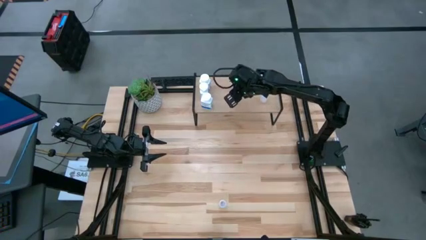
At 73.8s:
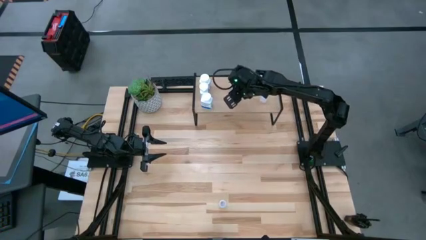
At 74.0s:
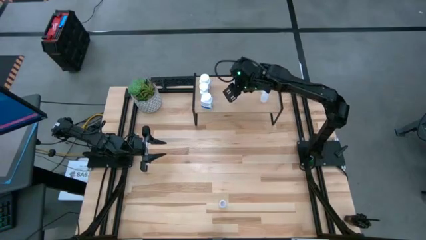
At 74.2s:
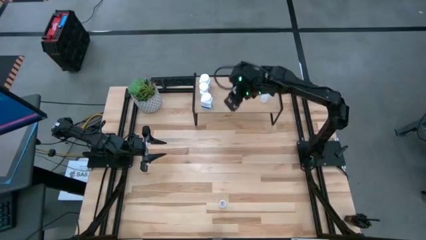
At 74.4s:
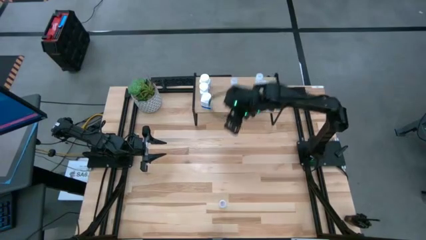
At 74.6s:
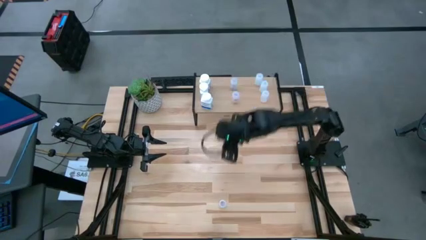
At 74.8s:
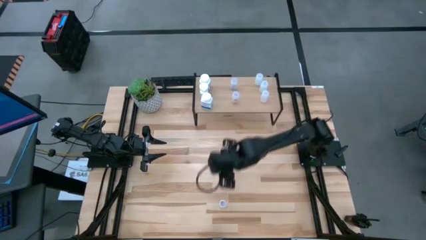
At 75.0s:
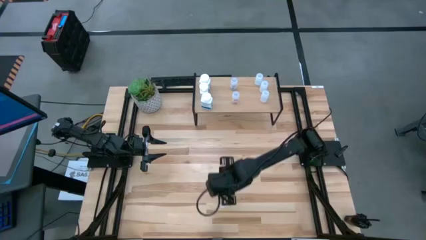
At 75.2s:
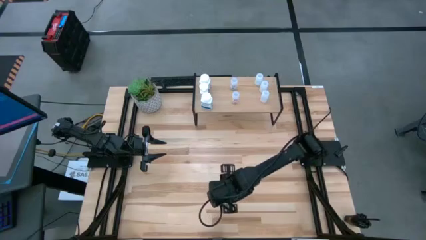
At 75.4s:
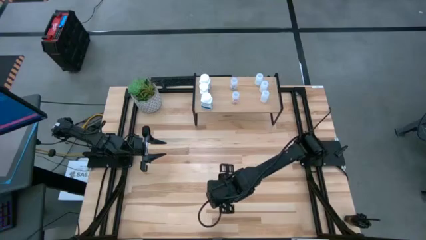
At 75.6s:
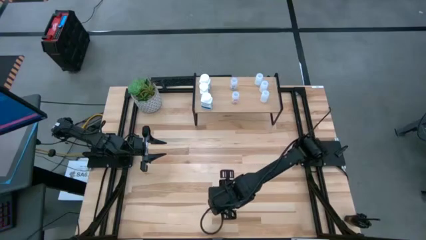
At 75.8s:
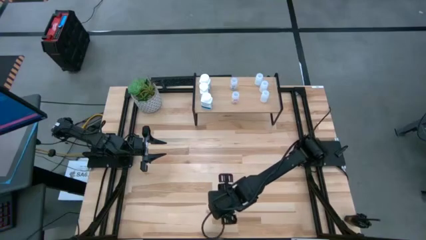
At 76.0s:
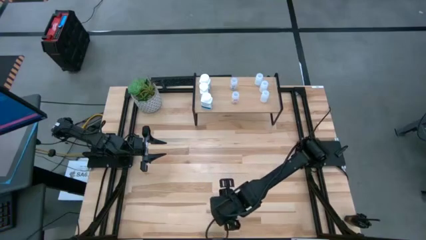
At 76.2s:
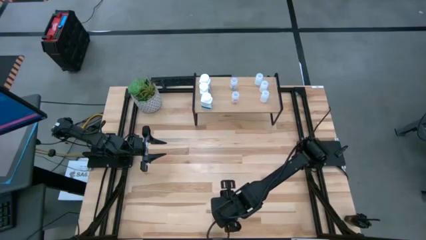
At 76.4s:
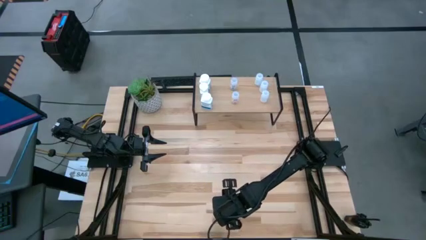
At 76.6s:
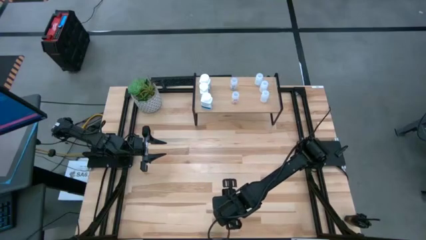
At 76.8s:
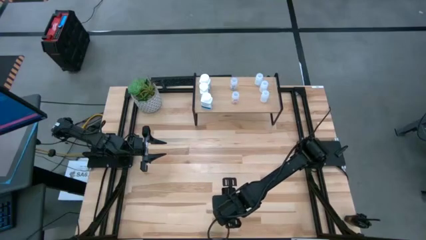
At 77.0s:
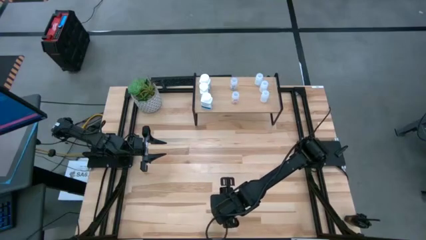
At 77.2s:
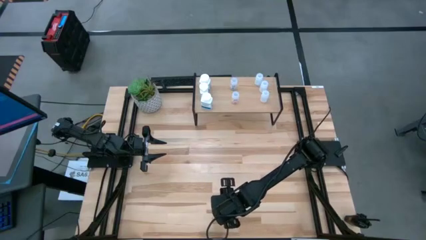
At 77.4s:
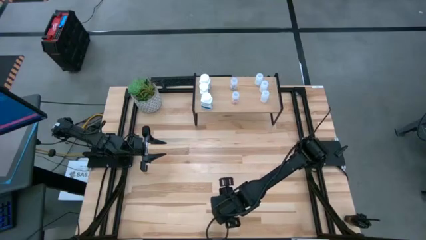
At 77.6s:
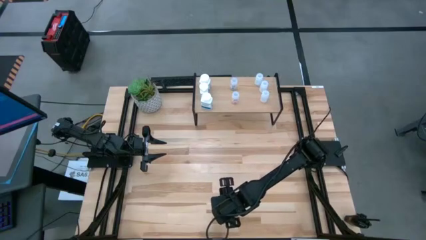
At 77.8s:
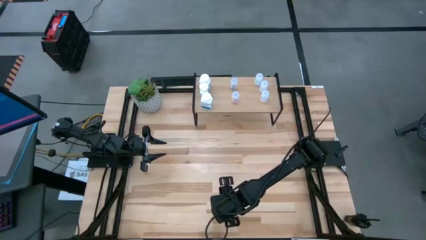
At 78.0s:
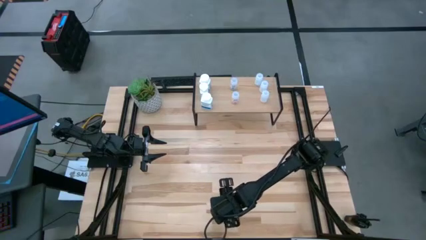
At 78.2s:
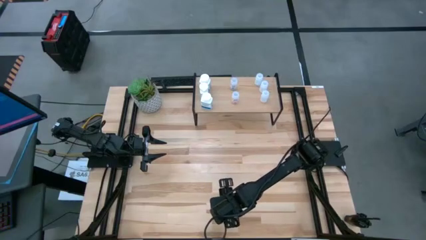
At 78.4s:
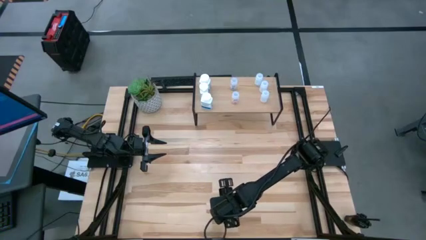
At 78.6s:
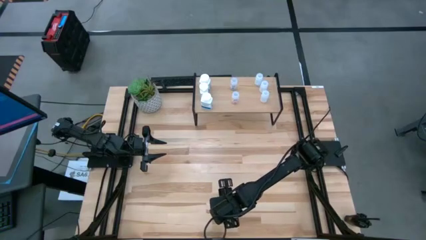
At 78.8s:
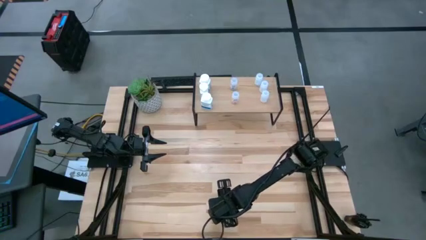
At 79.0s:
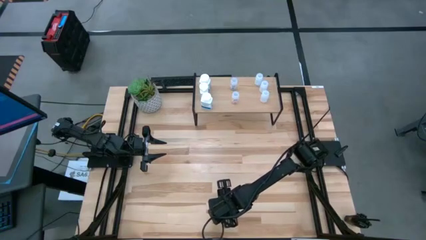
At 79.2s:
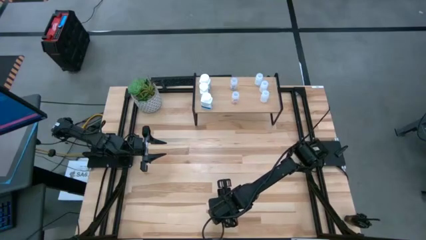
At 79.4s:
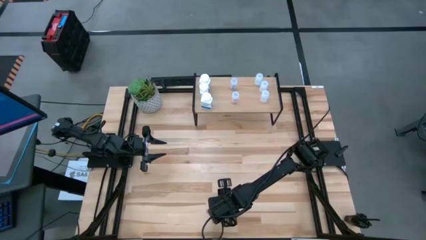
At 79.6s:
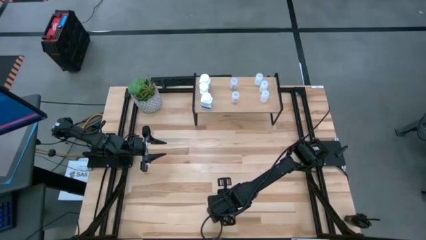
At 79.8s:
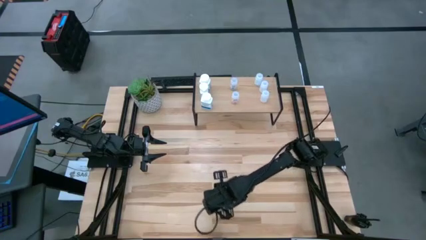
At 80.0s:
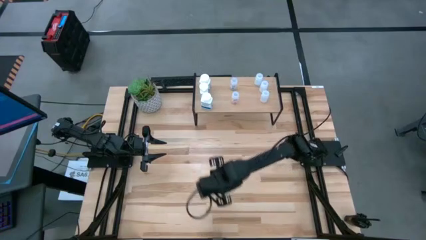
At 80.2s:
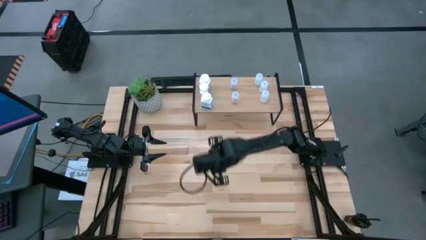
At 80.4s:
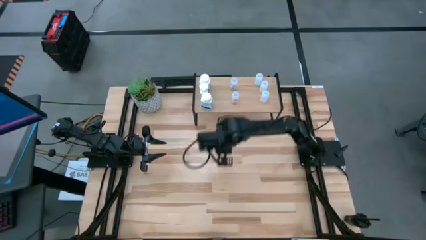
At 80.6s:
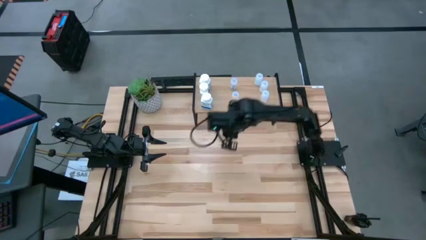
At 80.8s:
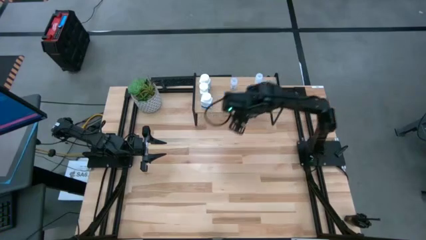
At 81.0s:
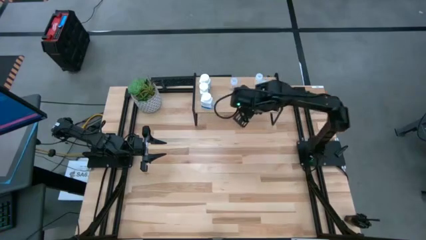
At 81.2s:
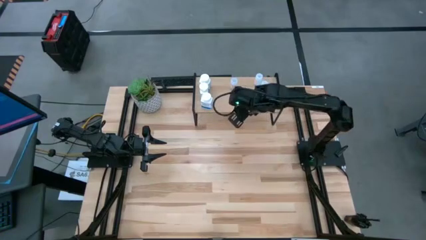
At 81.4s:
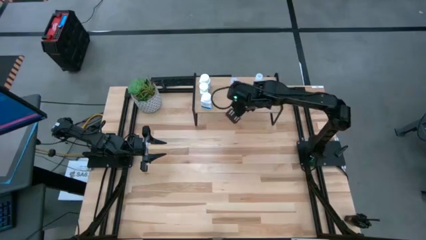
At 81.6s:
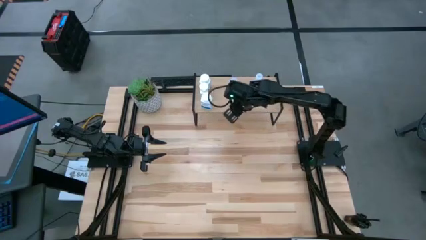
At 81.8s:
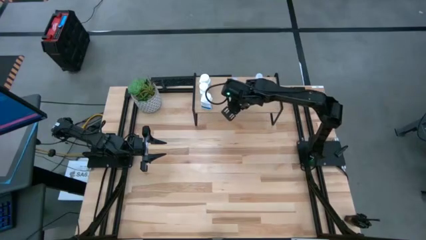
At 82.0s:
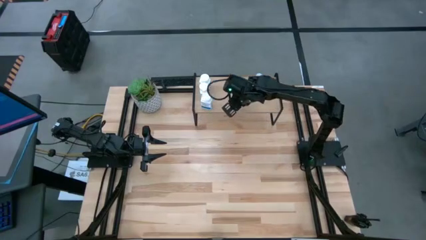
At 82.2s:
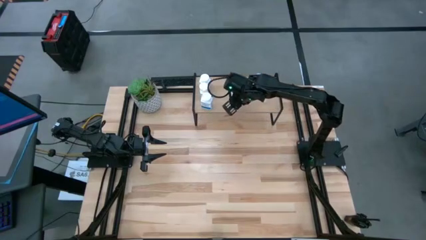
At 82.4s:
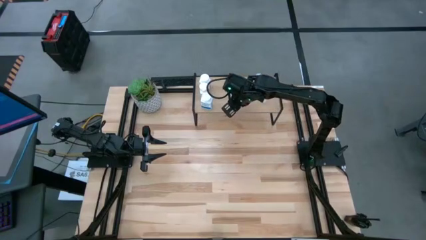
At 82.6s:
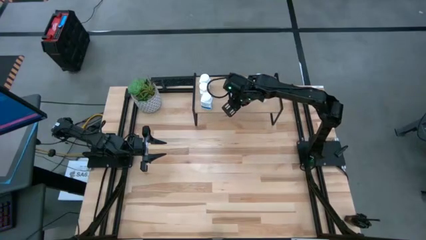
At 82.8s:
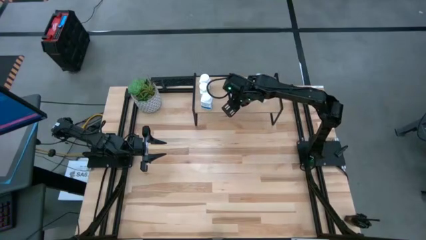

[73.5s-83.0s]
Task: Pick and place medicine bottles onto shelf by color
Put the transparent pill bottle on the shelf aligned with the other transparent pill bottles

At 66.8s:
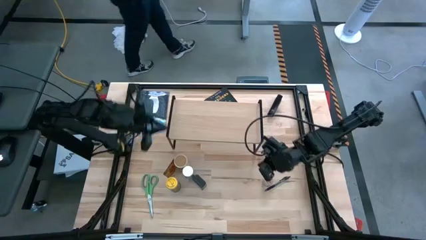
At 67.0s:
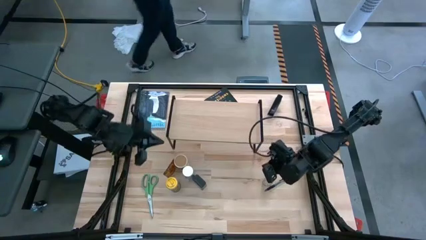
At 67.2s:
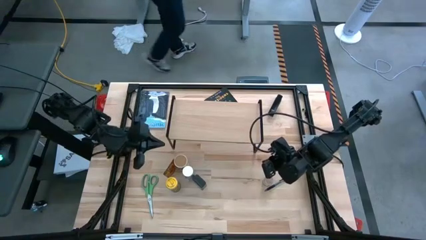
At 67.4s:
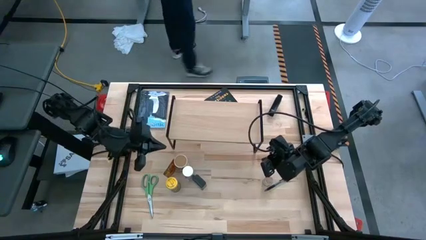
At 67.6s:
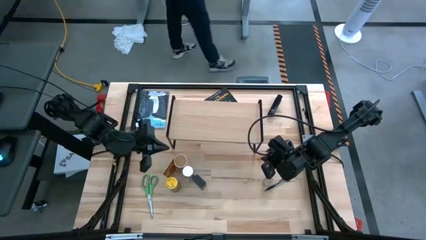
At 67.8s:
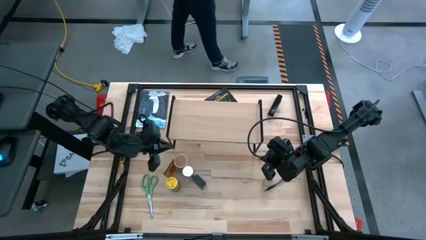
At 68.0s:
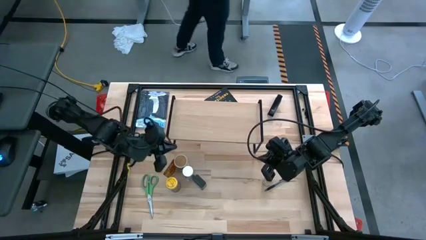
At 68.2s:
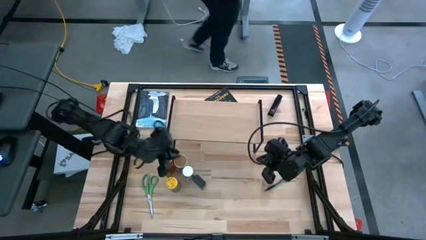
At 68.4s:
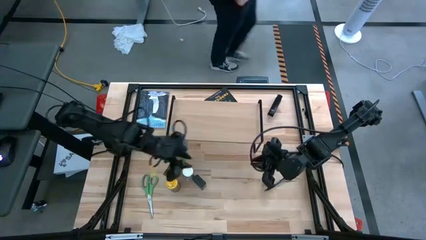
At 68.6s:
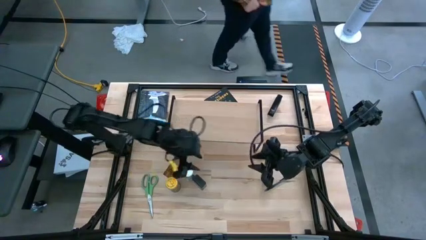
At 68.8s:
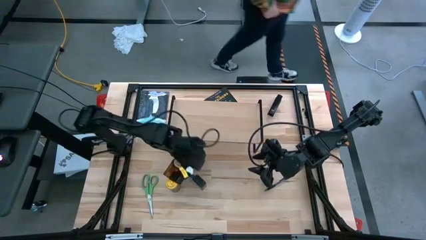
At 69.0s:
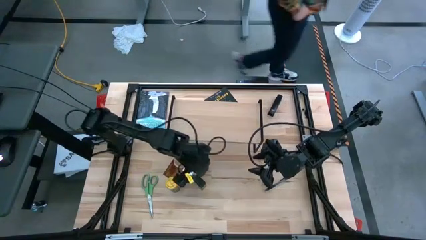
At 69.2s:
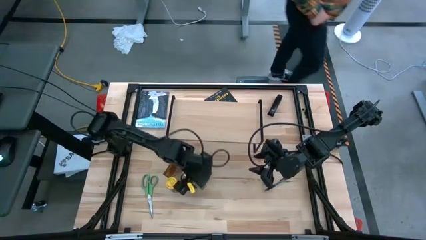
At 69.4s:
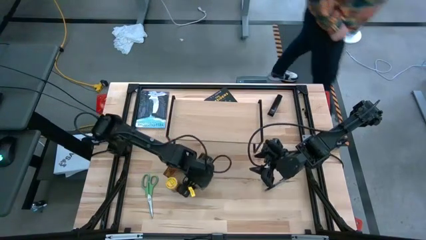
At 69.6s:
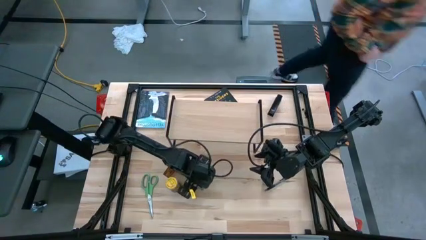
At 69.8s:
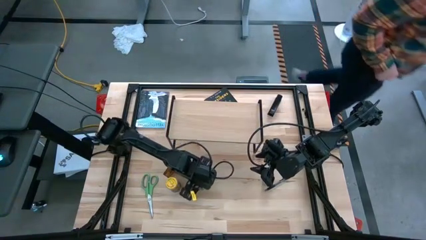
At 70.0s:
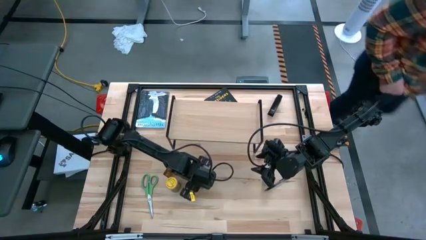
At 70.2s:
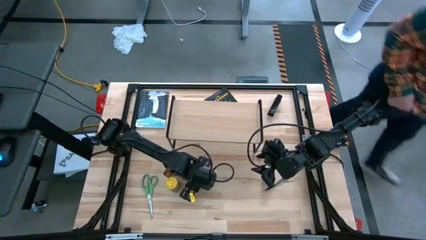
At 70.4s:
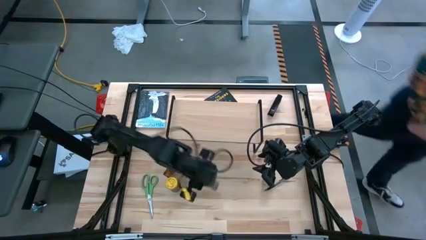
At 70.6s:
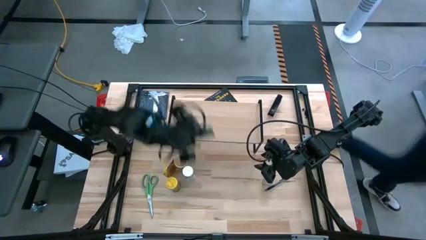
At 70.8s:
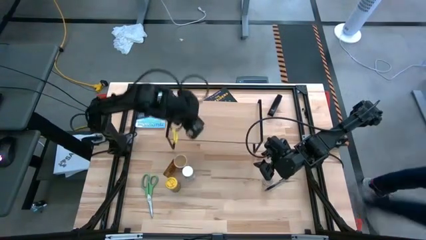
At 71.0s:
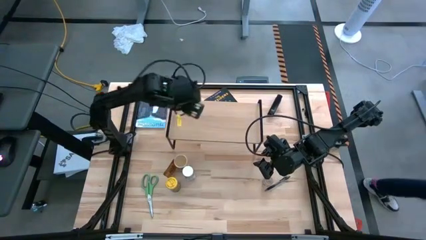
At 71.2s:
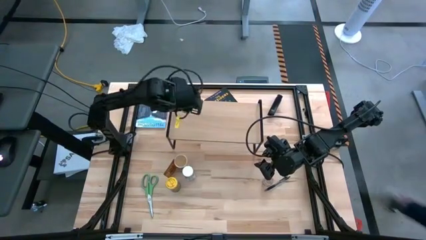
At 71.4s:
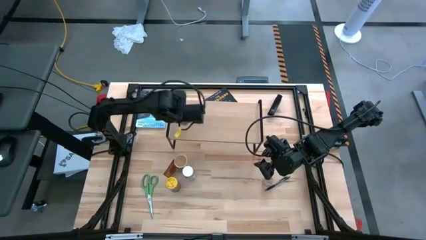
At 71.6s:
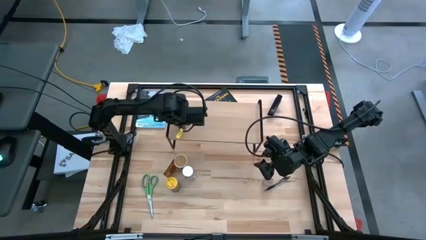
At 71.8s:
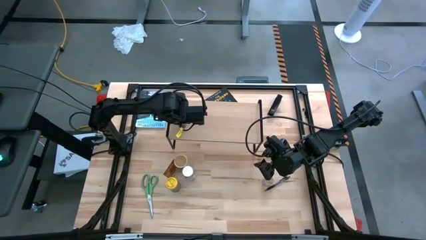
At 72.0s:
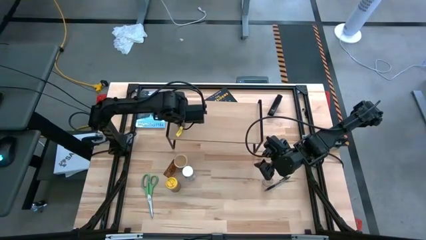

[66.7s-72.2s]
Task: Shelf spices
Put the black seasoning can on the shelf
